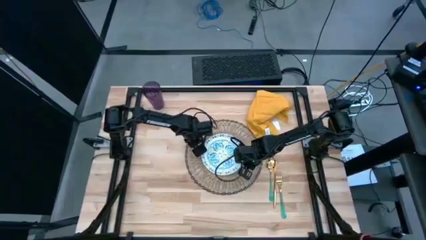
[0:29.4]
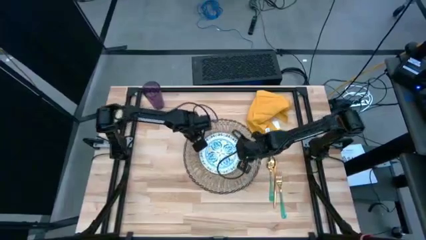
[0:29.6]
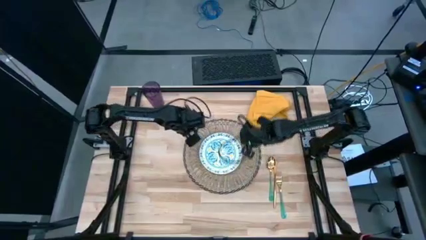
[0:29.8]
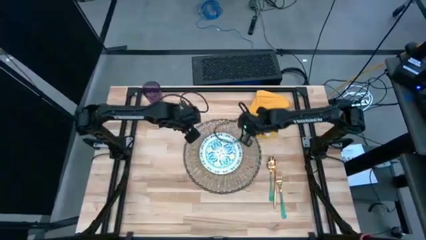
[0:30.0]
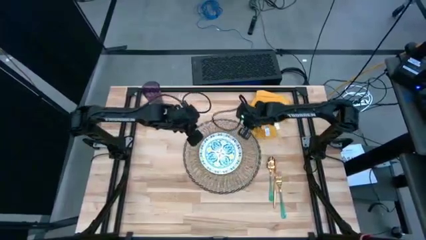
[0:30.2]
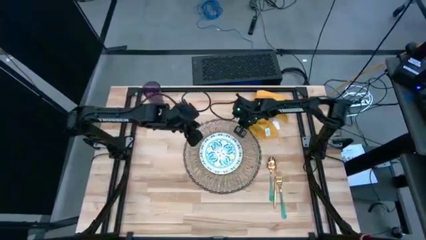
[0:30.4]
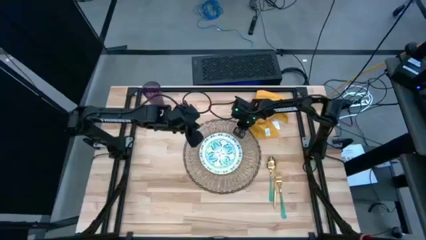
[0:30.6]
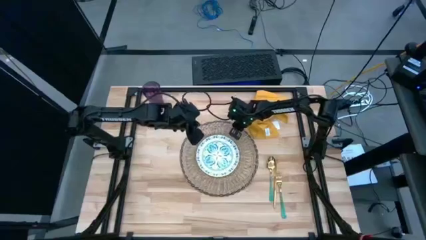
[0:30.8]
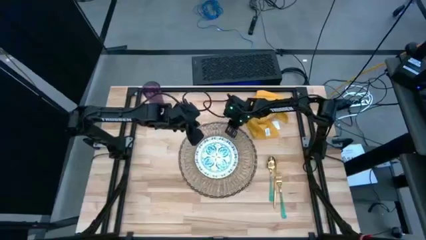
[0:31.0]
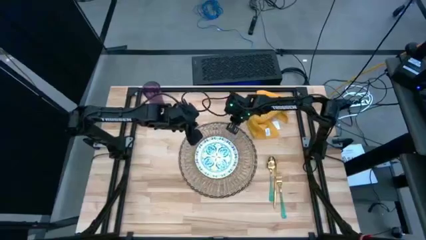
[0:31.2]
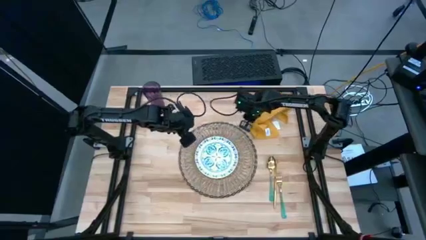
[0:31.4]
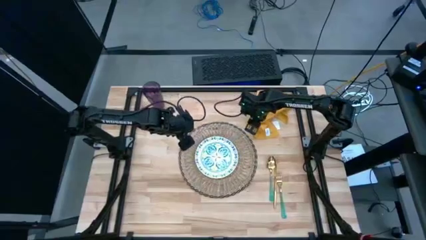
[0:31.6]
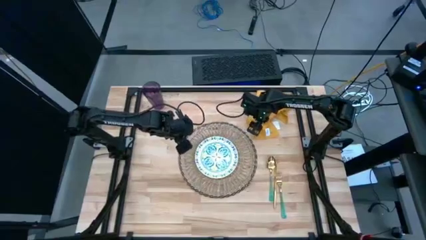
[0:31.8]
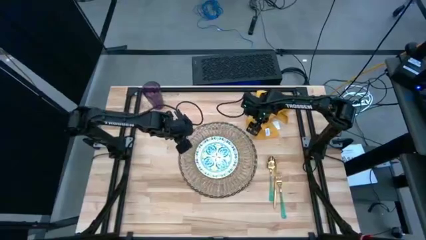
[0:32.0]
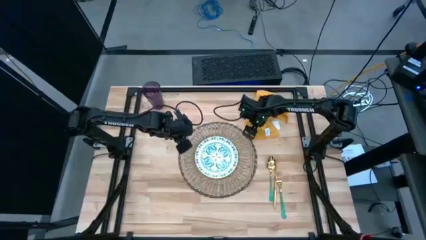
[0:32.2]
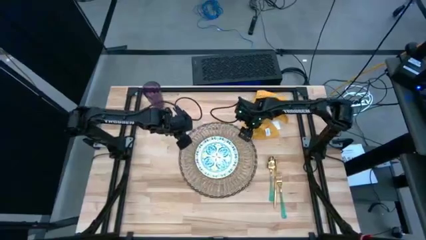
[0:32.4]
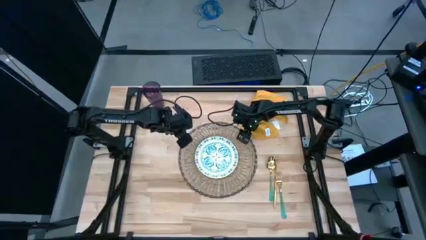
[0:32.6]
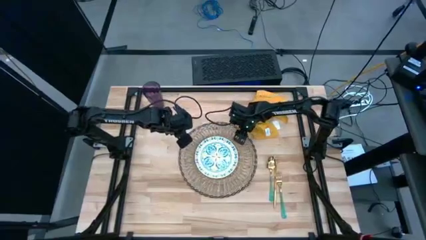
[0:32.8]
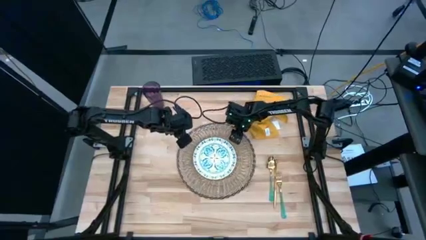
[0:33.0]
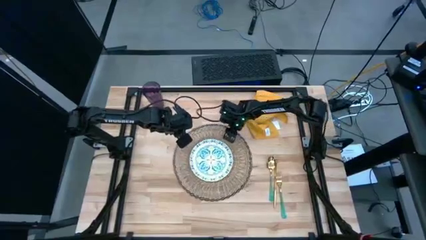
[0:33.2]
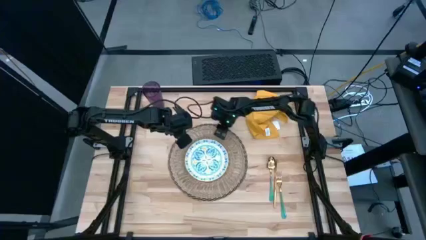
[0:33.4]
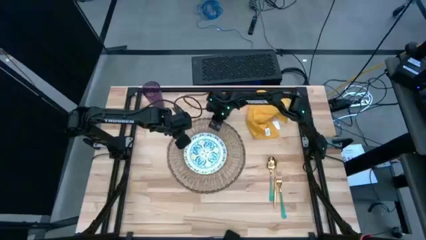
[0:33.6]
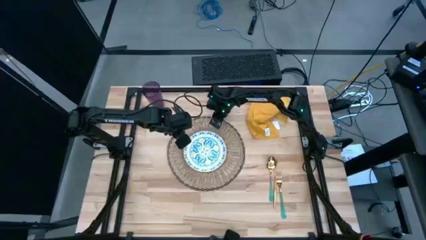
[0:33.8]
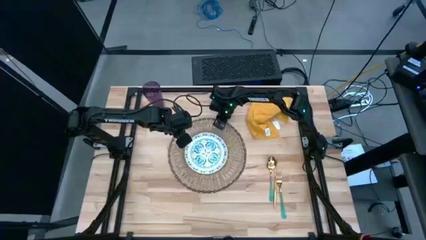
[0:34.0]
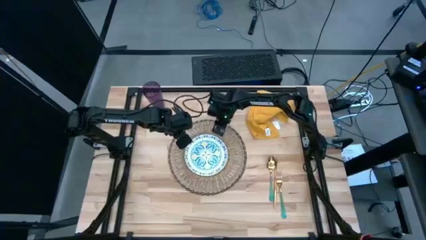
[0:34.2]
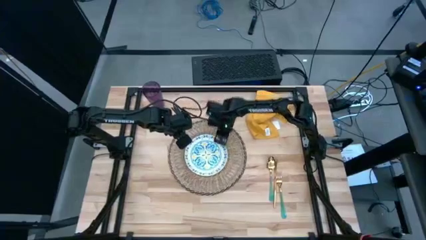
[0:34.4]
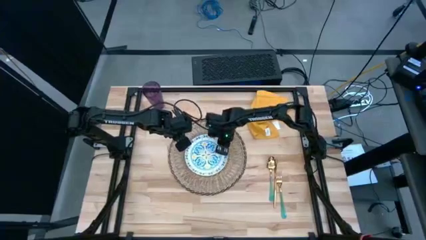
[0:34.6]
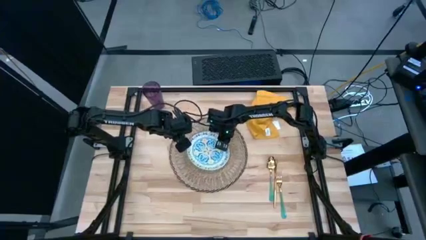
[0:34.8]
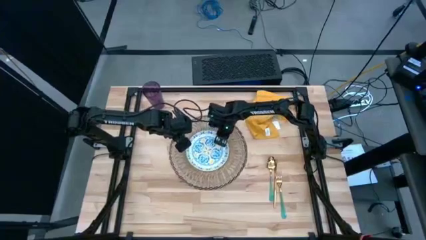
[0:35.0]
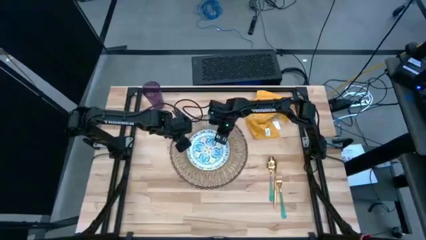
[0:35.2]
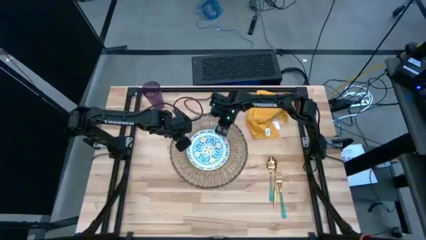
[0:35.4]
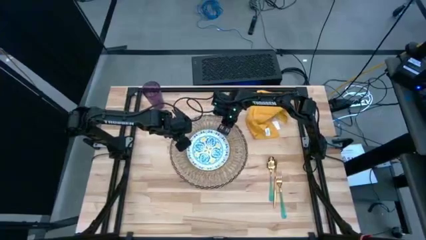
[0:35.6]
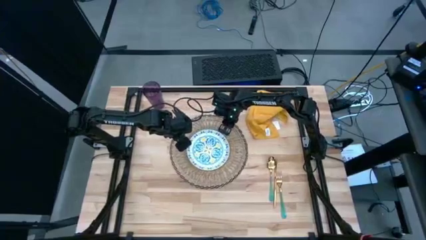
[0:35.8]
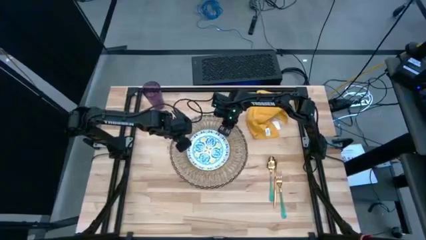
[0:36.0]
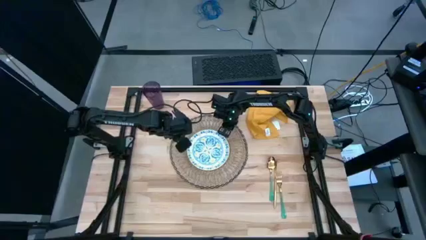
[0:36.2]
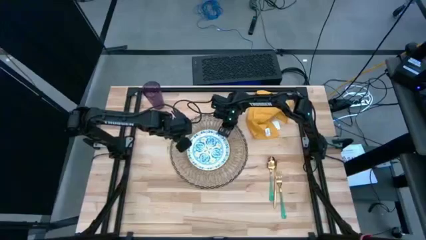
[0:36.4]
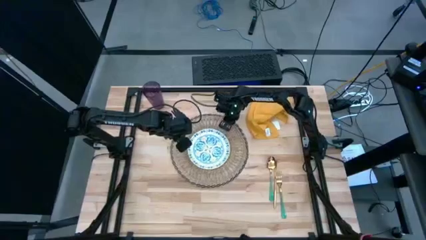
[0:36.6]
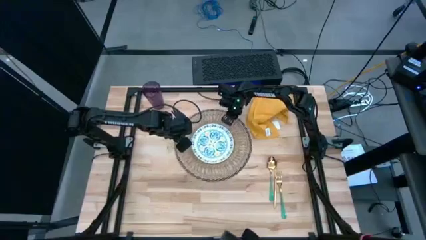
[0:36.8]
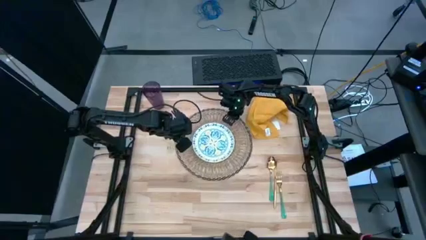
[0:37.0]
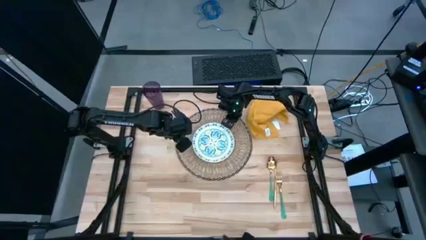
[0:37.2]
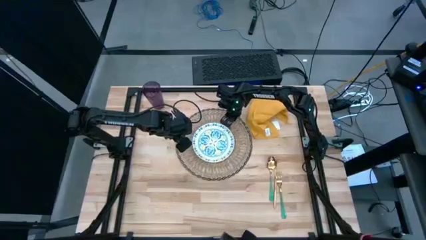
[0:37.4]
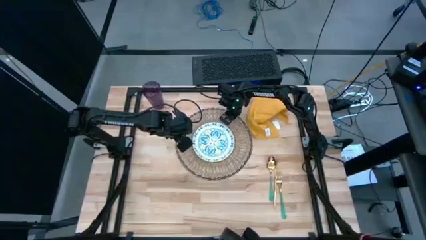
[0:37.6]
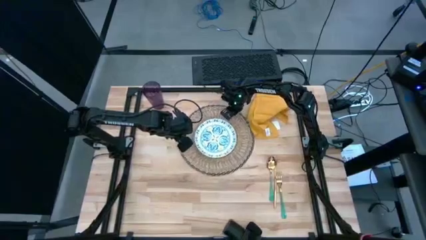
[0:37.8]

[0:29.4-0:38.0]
Task: Set table place
Move the tablemat to the top center of the table

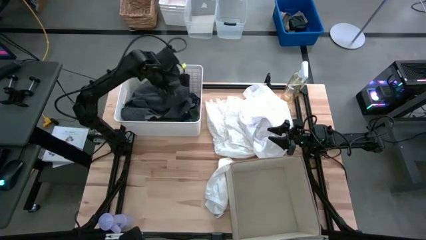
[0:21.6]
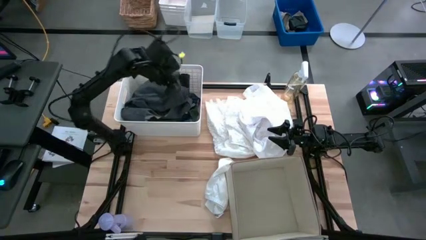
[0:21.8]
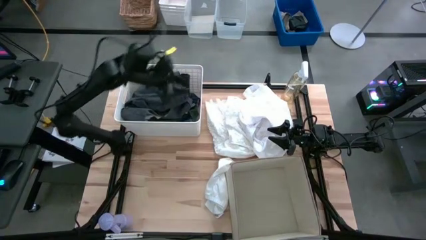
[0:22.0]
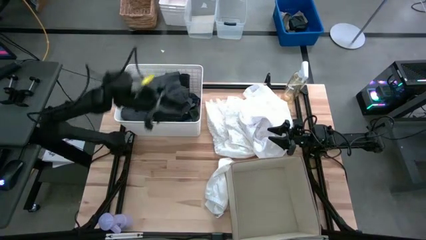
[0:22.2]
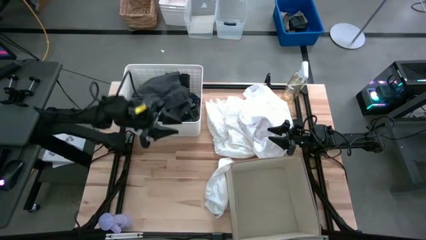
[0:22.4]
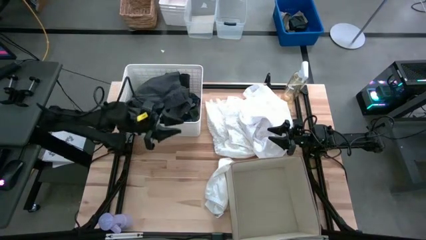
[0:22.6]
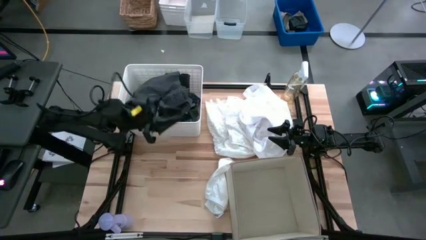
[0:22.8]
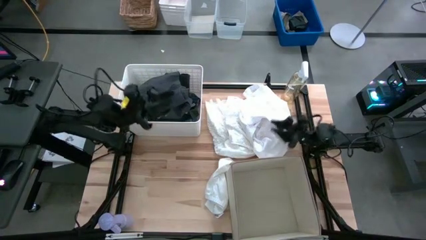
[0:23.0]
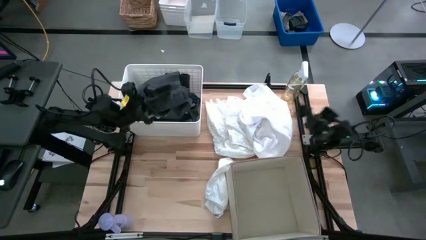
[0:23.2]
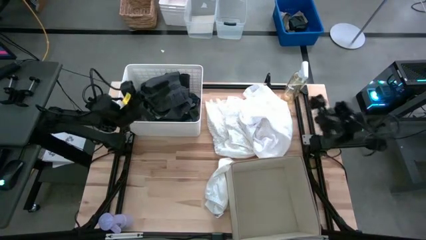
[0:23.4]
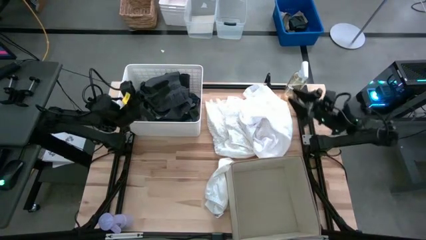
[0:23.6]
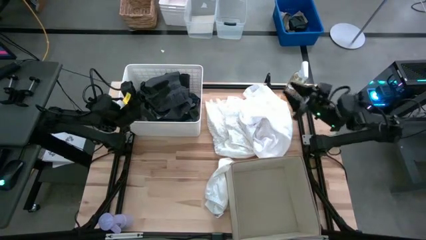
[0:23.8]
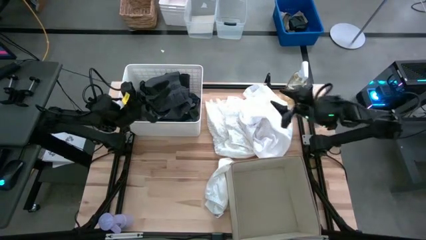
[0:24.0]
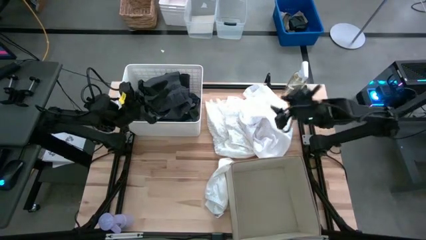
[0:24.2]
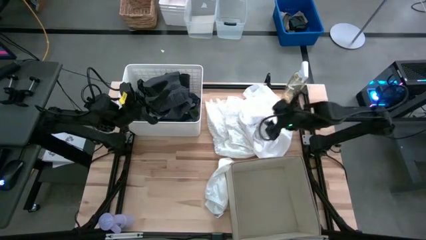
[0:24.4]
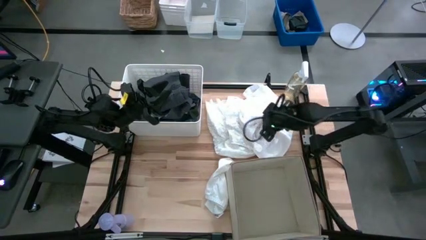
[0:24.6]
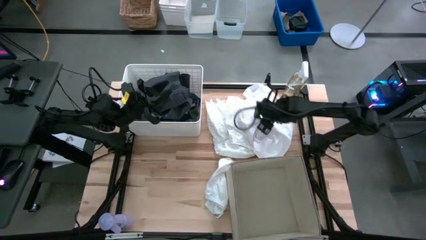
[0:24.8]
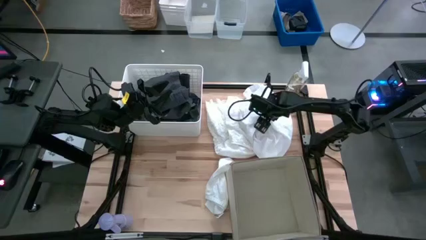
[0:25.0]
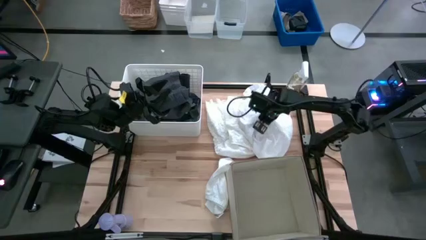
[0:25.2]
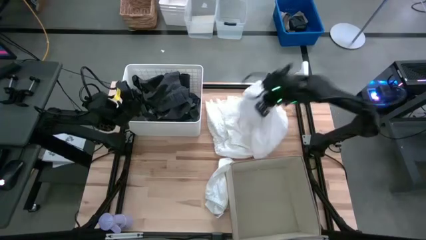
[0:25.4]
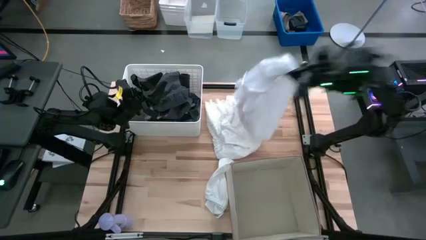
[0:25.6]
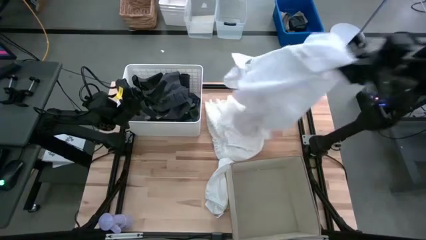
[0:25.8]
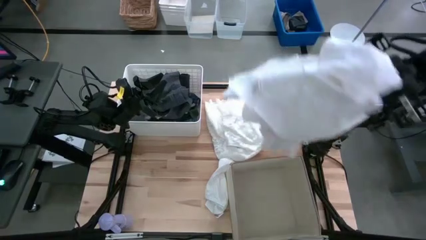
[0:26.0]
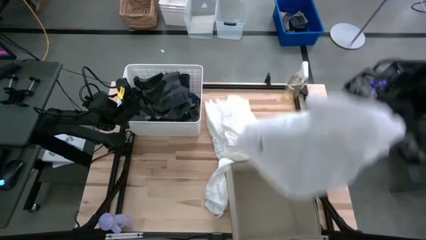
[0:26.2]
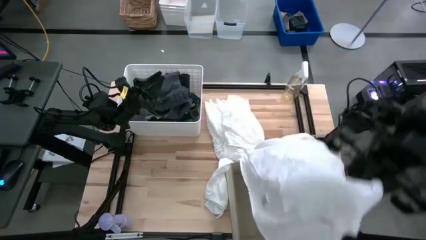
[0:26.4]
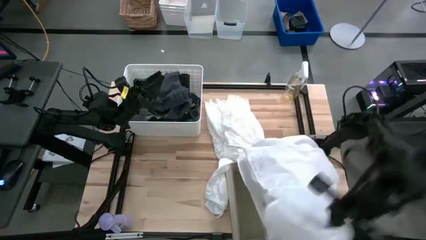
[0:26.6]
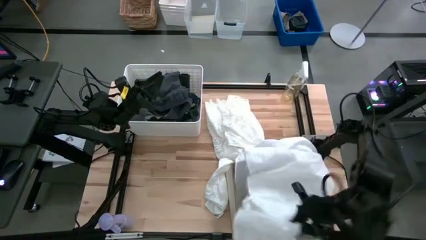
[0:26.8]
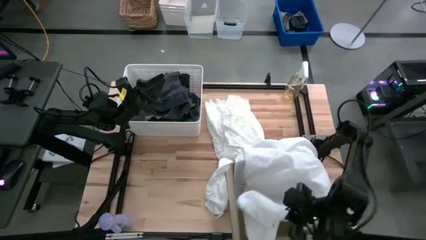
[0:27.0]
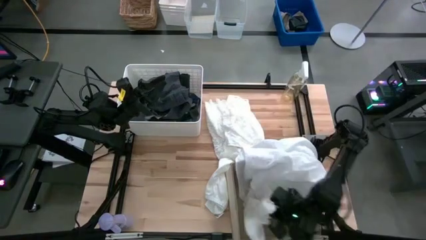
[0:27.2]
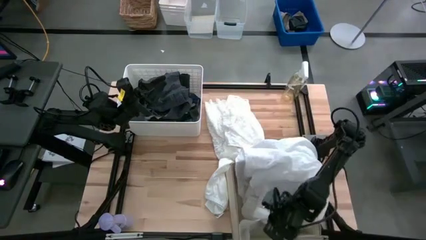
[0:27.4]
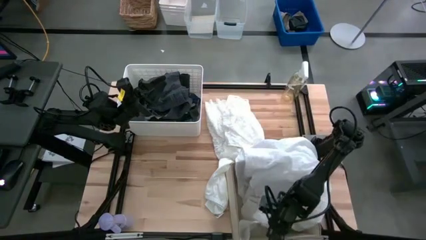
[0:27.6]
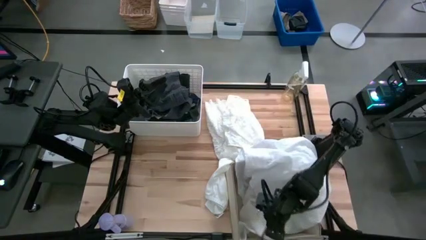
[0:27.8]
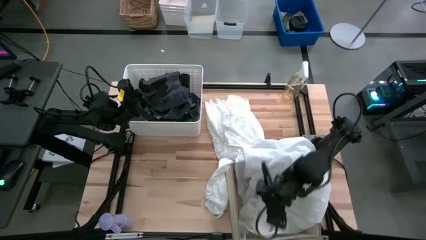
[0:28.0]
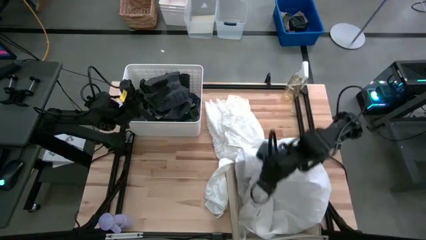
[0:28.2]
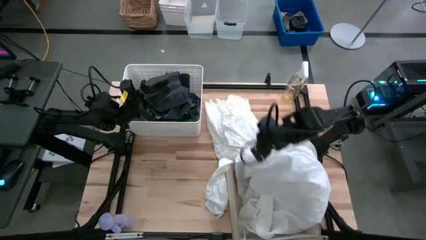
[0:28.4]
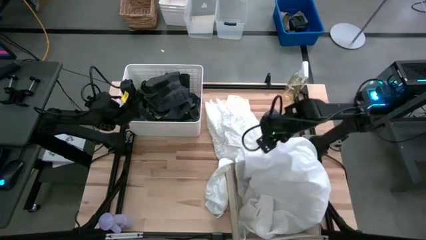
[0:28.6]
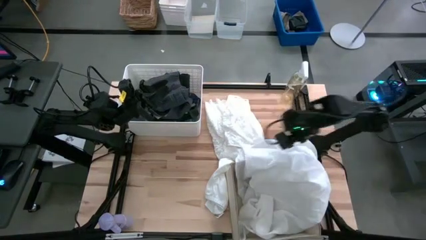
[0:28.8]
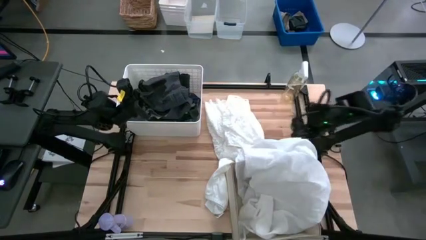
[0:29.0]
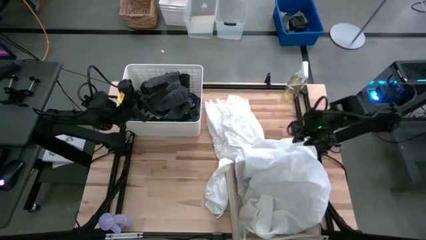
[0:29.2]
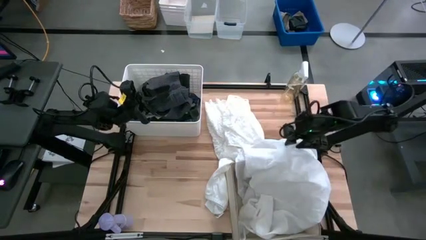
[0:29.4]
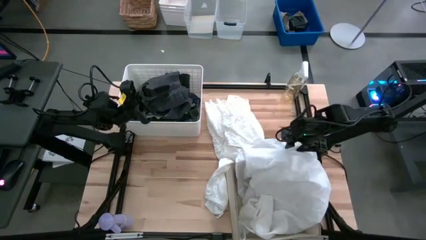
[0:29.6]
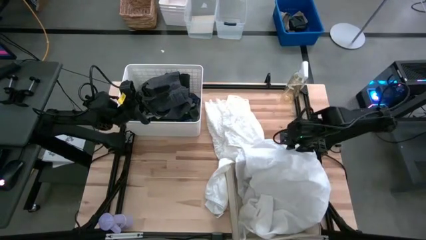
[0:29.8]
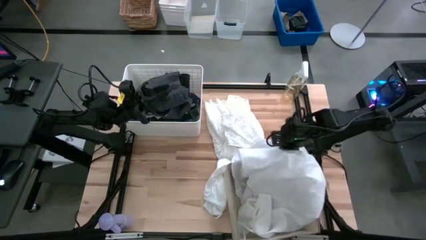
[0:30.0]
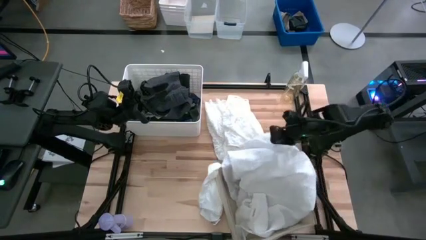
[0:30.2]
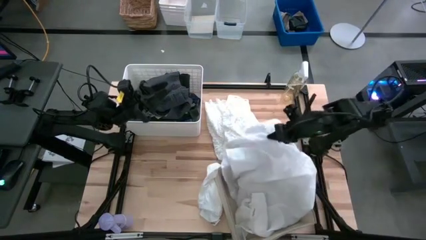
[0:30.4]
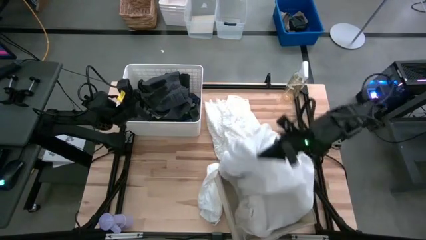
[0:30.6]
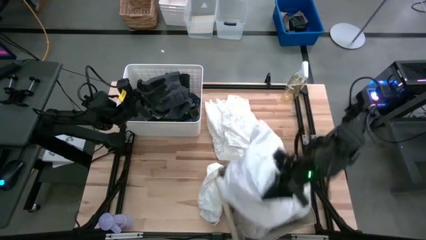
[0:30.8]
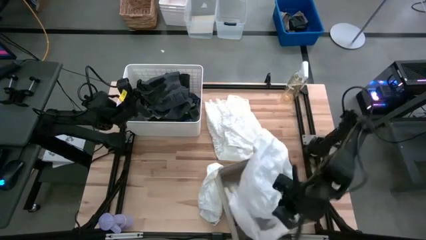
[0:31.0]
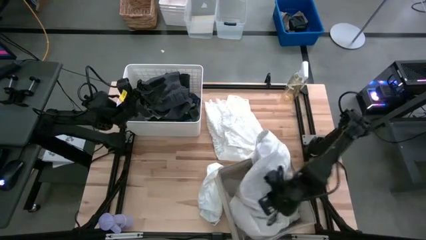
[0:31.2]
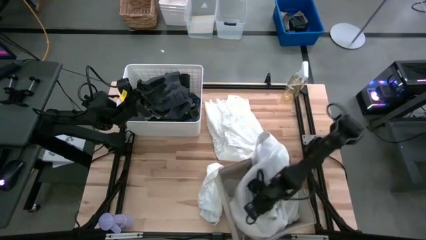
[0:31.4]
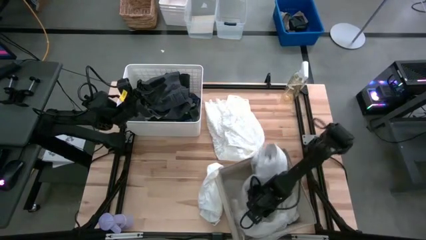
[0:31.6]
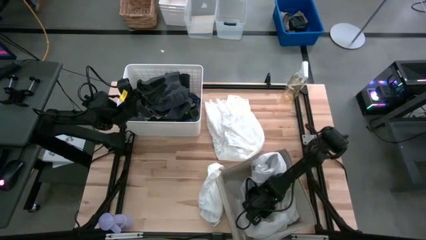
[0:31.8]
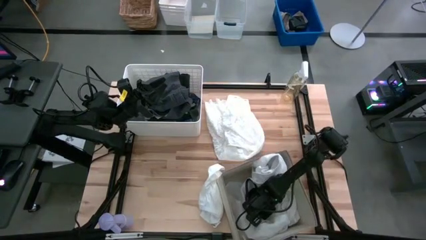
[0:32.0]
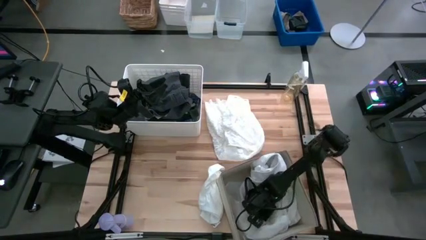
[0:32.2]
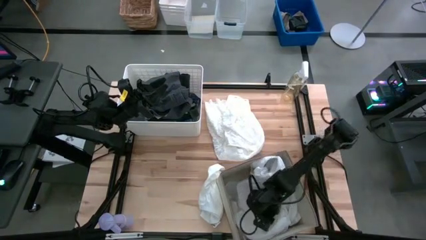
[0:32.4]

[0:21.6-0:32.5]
Task: Sort clothes
Put the white shirt into the bottom white laundry organizer
